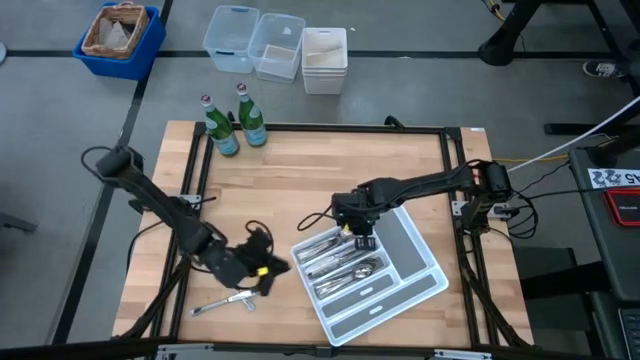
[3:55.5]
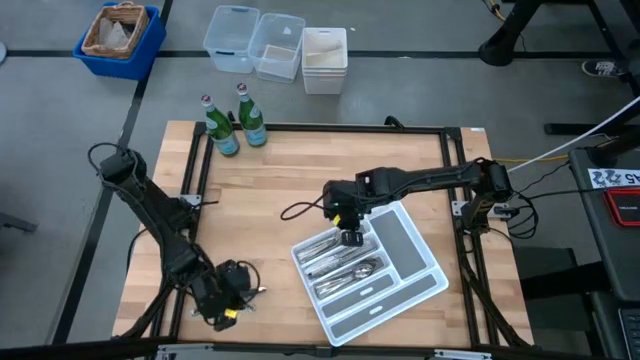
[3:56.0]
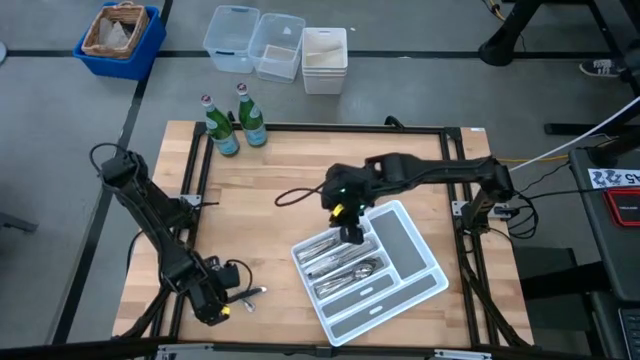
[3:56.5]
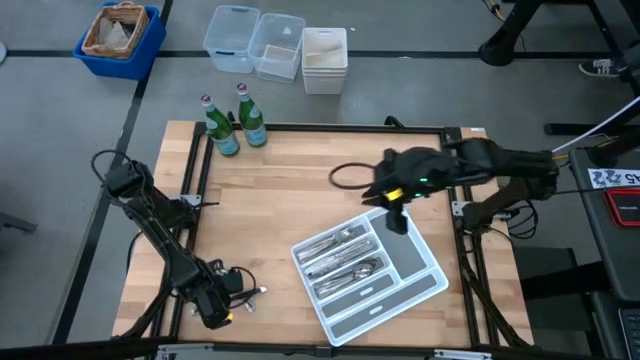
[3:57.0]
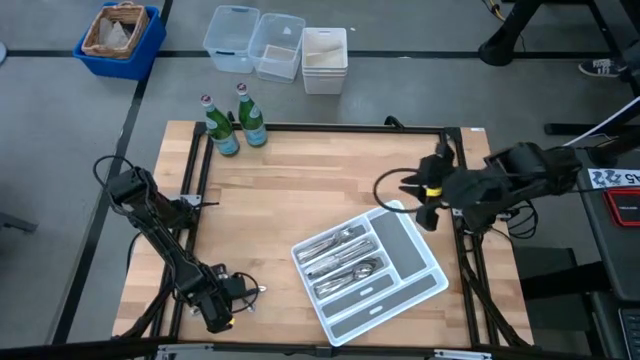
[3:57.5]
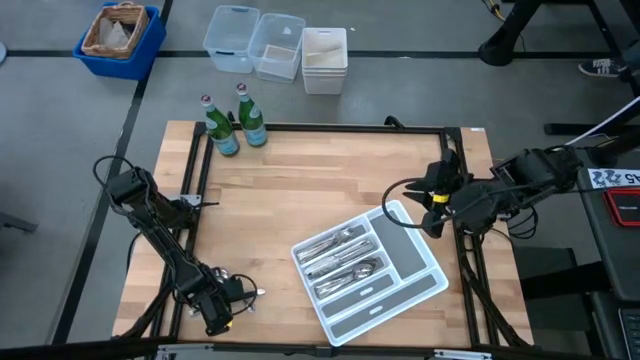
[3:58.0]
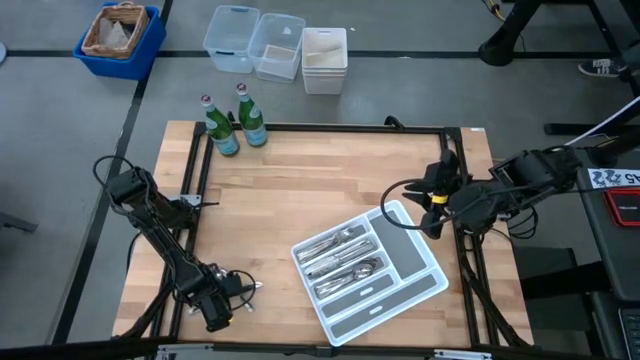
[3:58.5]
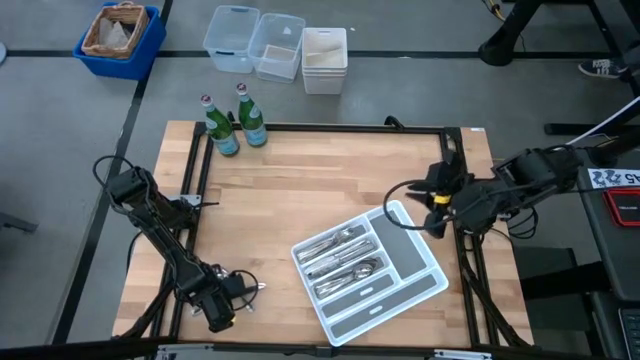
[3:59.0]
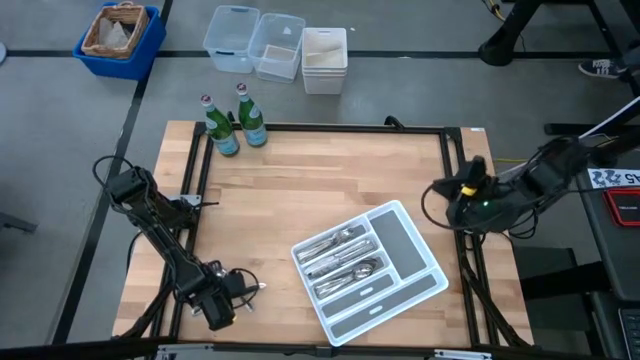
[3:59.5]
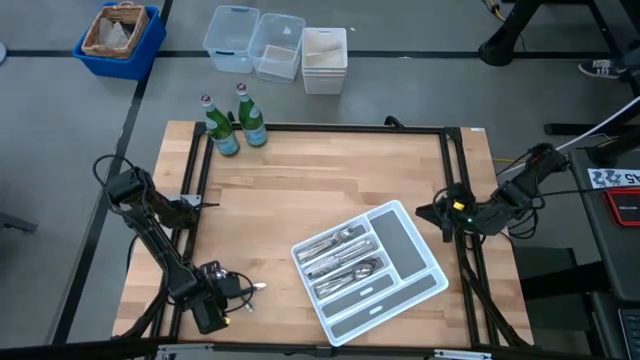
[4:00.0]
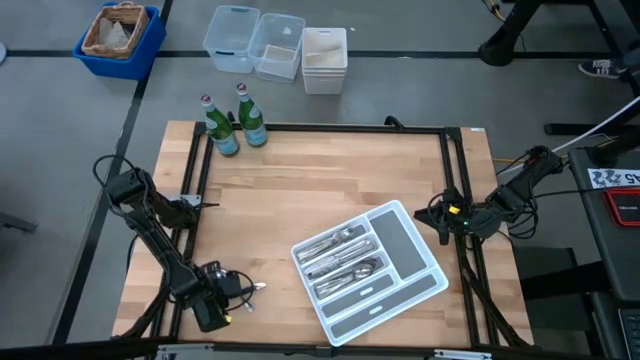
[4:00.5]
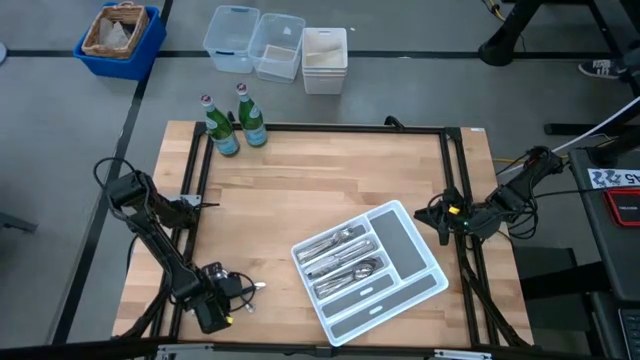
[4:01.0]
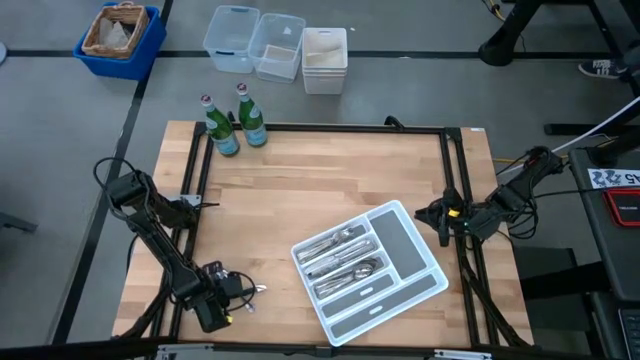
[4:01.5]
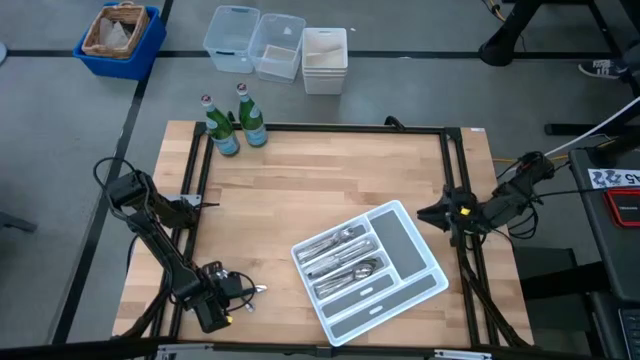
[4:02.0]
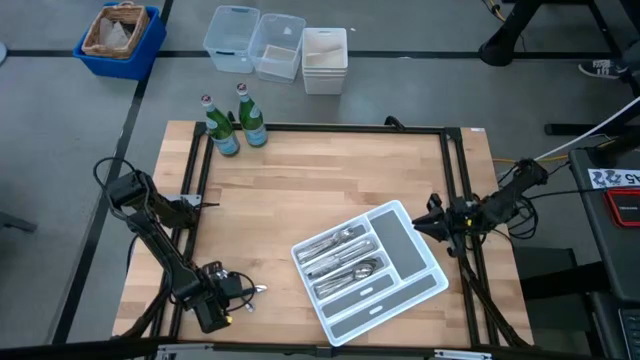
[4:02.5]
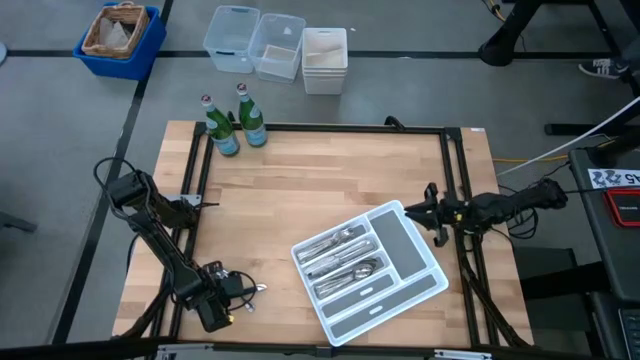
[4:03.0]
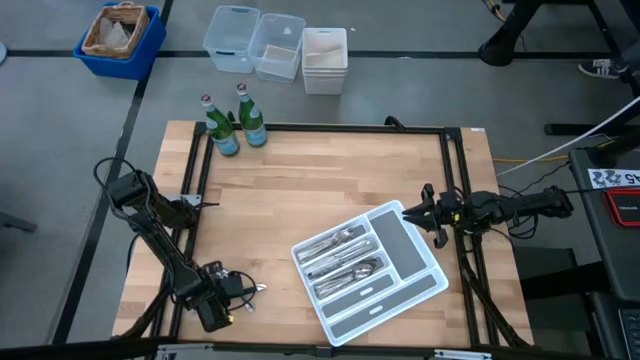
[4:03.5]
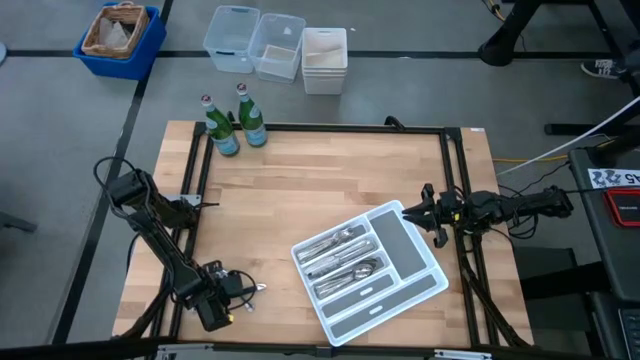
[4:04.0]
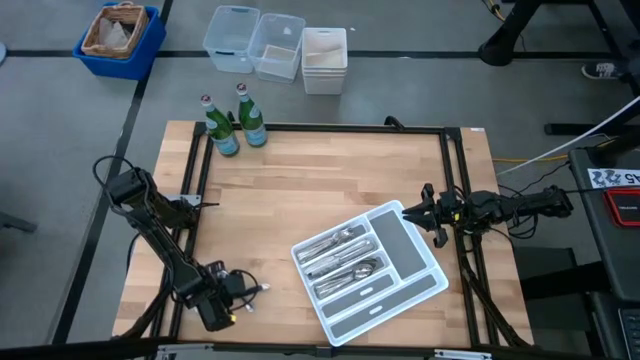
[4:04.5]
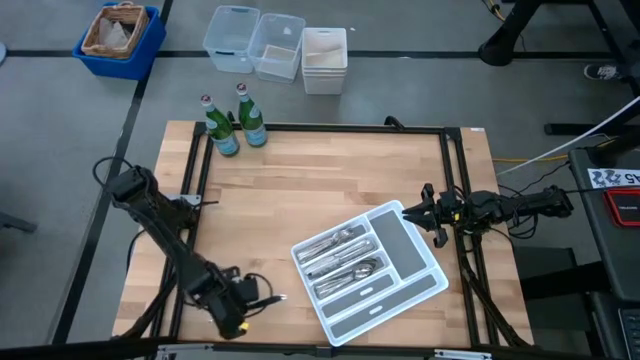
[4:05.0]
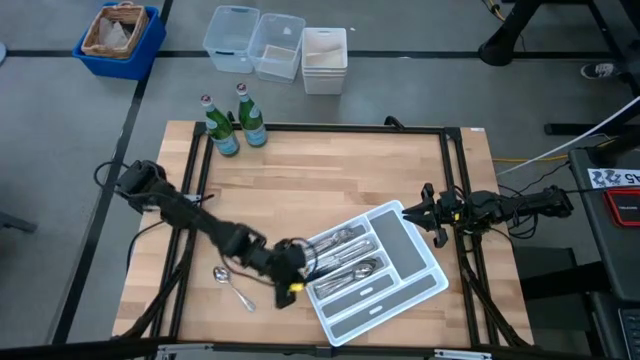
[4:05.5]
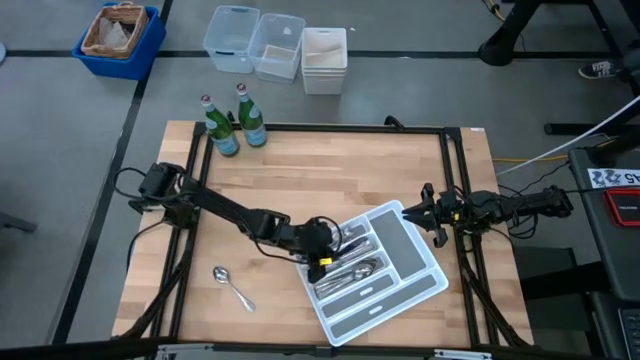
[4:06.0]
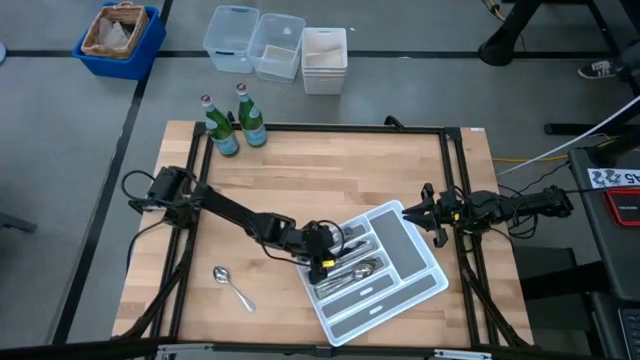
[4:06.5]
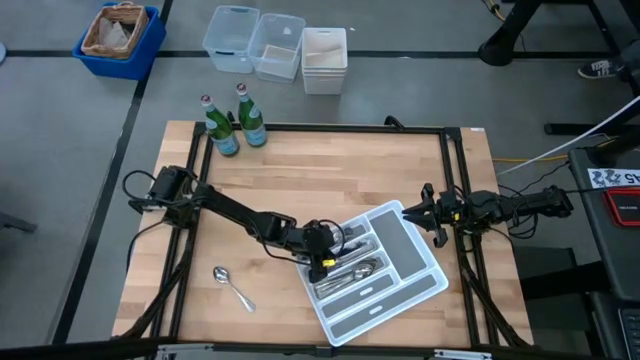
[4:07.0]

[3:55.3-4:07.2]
Task: Sort silverware
Put the silver table knife into the white silverware tray

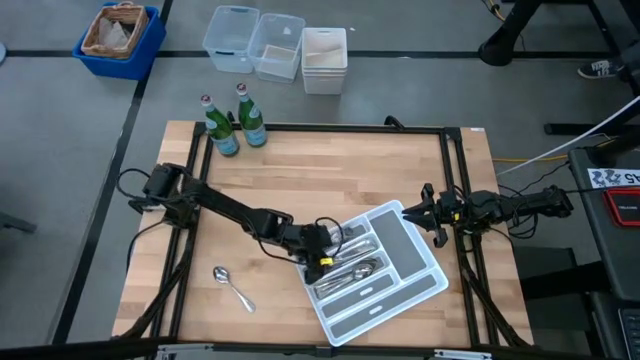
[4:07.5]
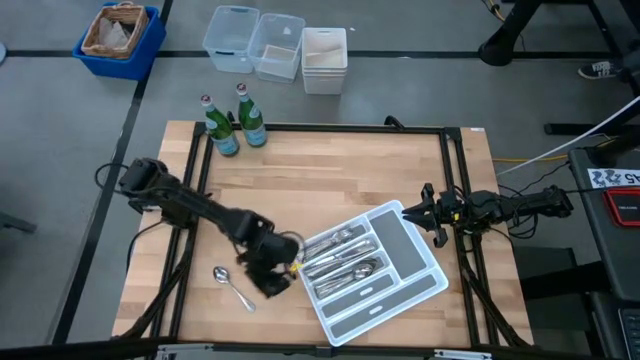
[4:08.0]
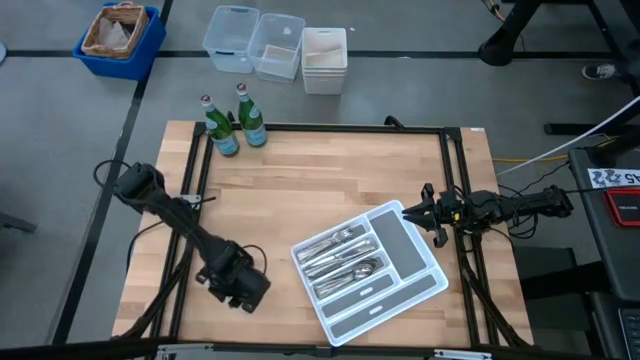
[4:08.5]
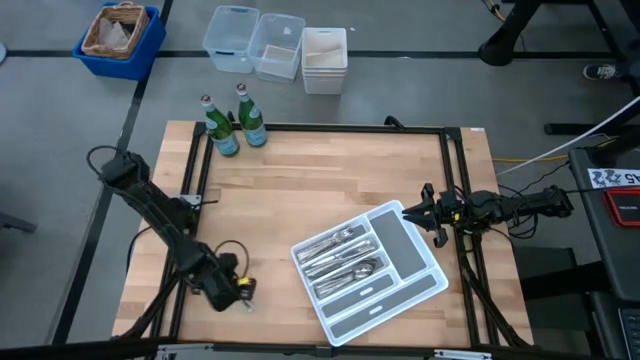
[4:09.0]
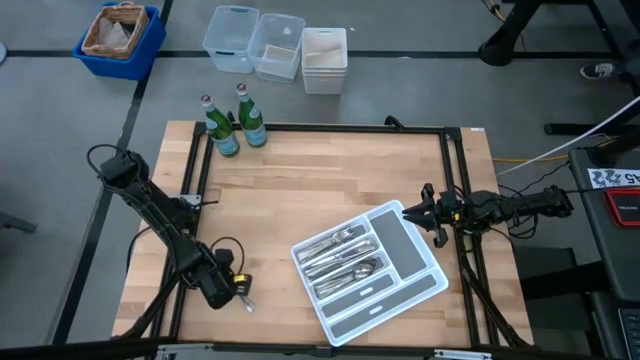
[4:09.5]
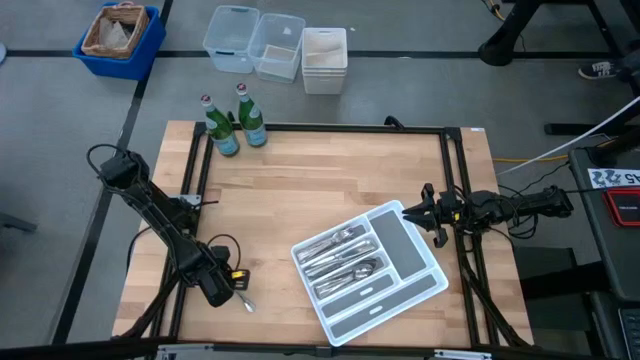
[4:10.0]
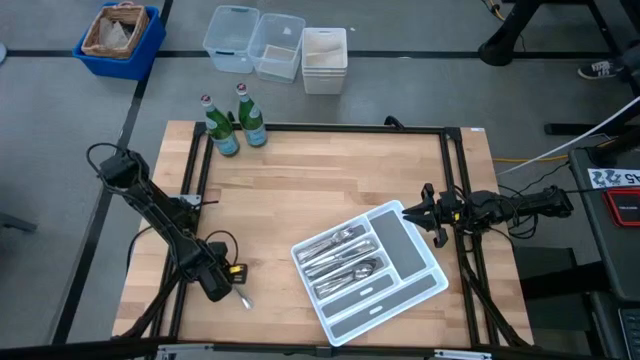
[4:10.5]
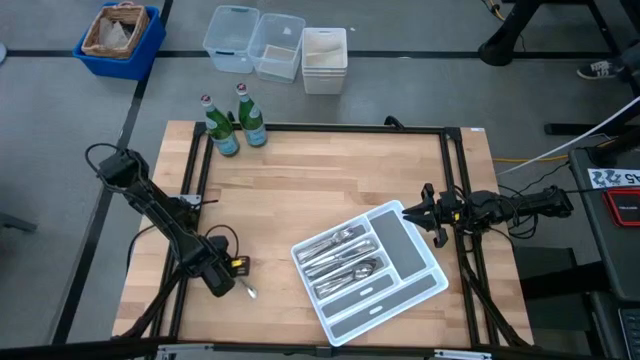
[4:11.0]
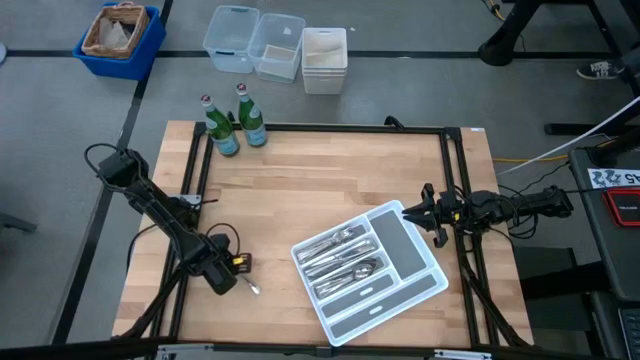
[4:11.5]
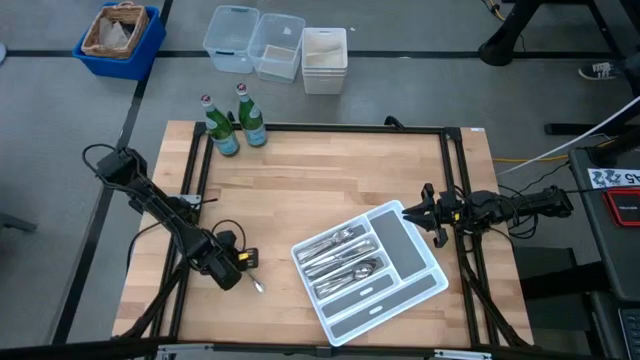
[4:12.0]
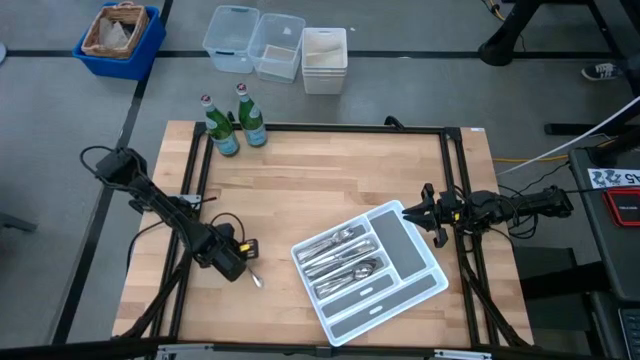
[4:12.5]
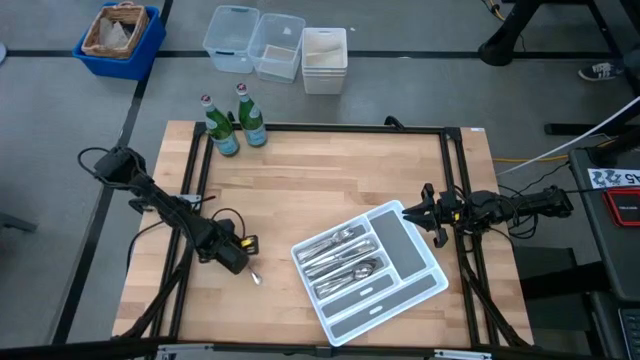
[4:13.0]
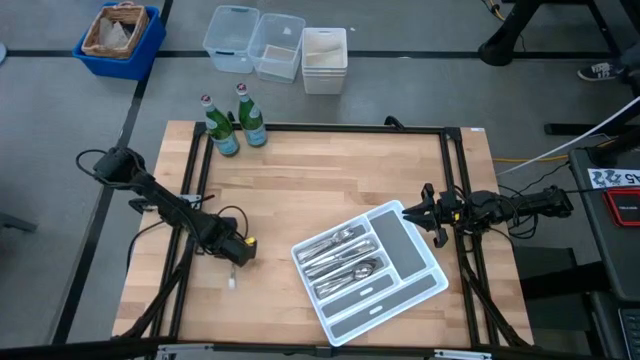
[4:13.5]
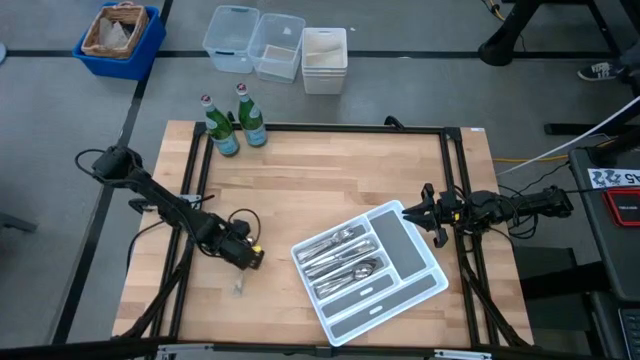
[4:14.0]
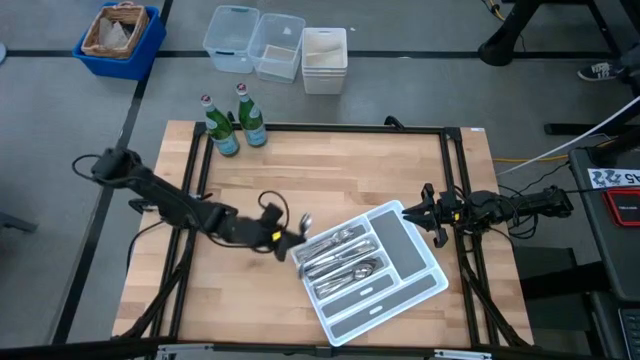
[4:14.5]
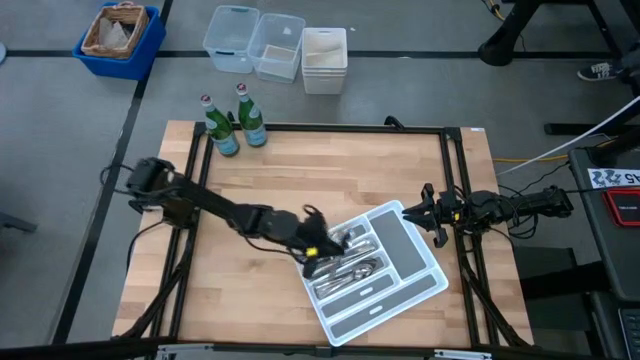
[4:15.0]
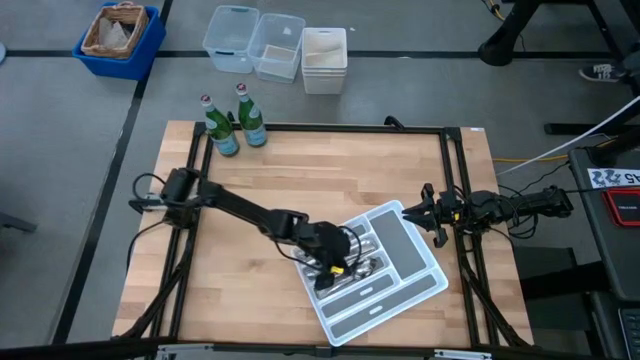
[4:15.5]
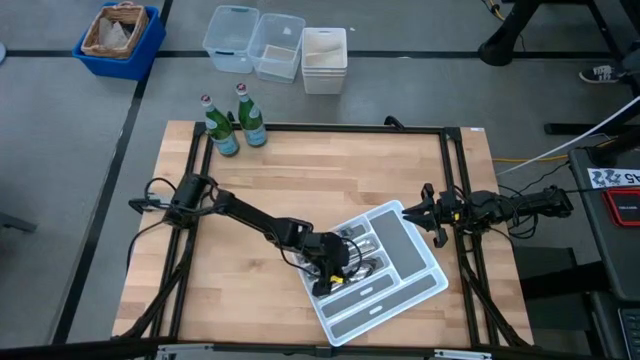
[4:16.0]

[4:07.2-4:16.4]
Put the silver spoon into the white silverware tray
